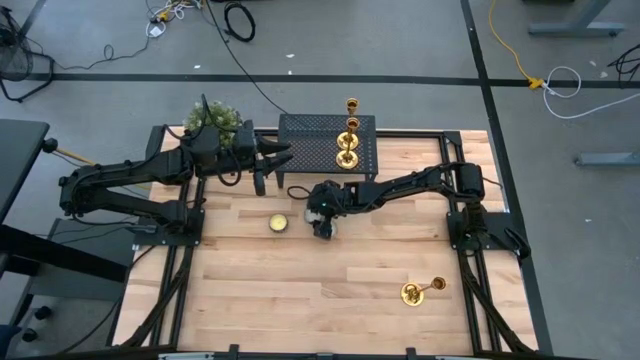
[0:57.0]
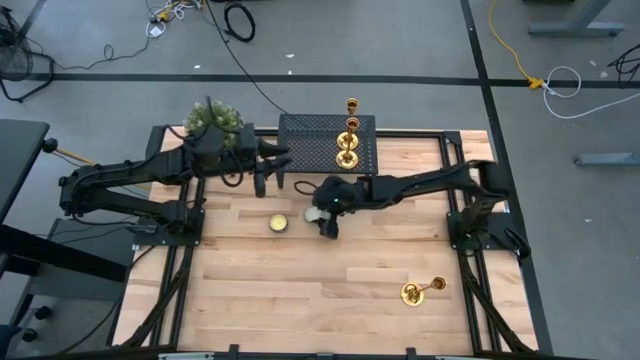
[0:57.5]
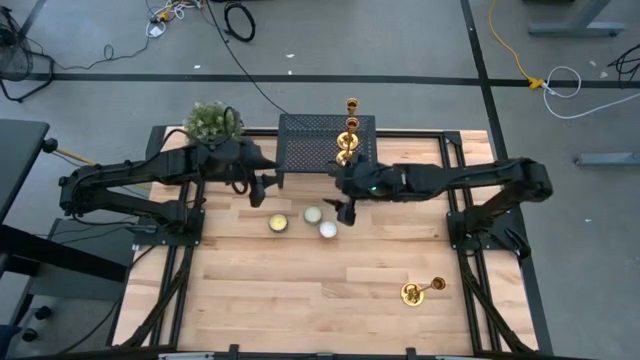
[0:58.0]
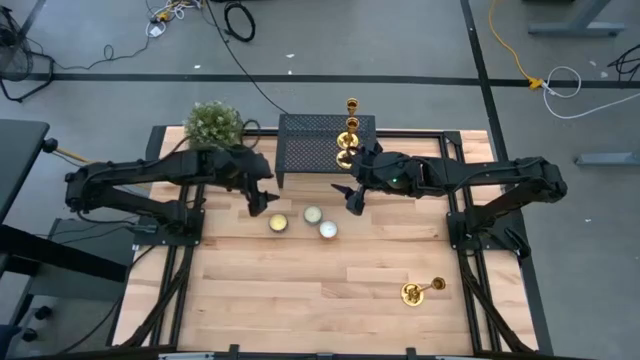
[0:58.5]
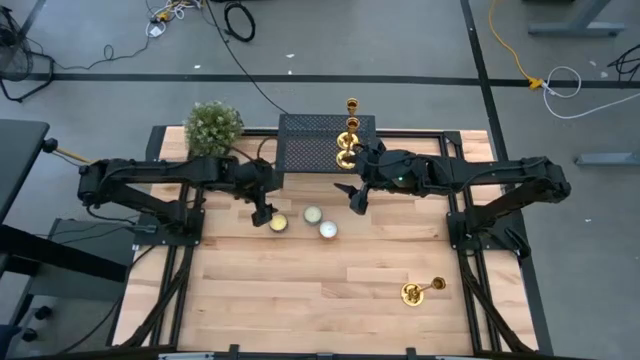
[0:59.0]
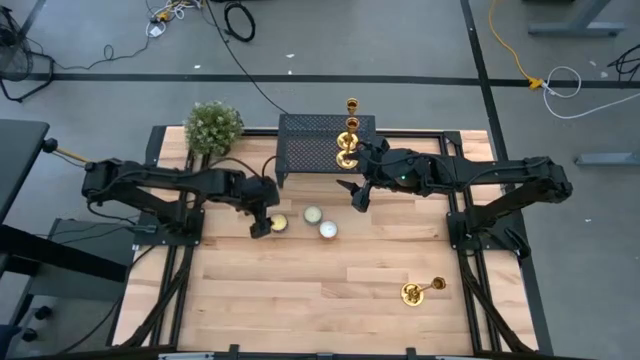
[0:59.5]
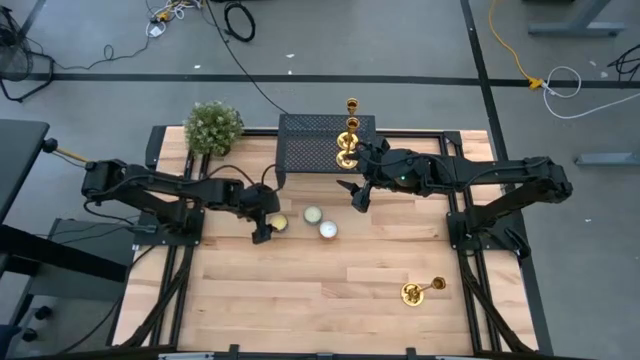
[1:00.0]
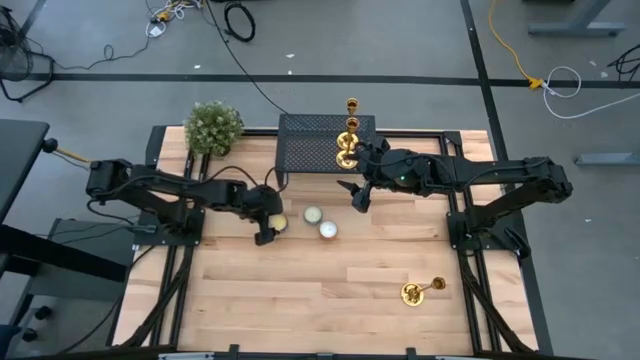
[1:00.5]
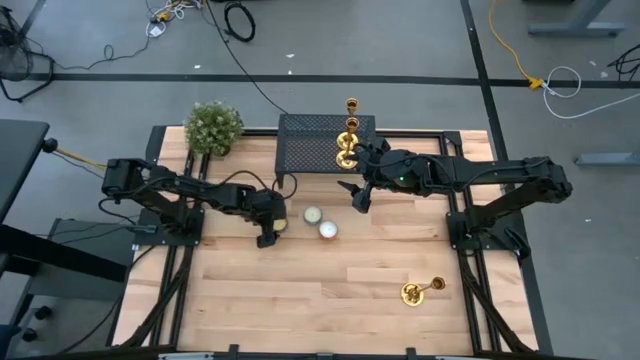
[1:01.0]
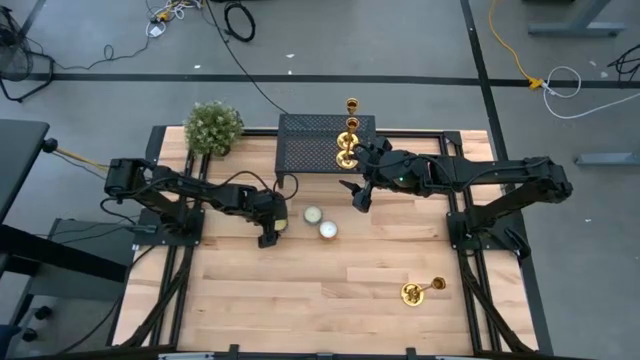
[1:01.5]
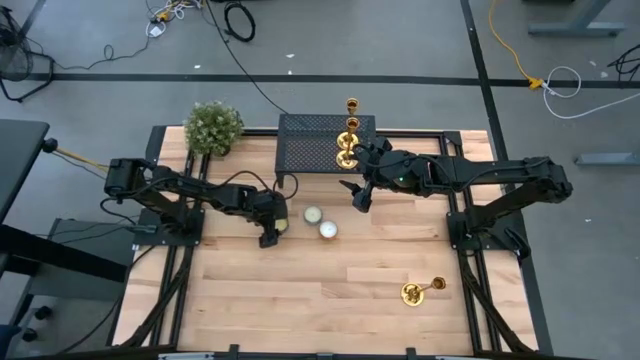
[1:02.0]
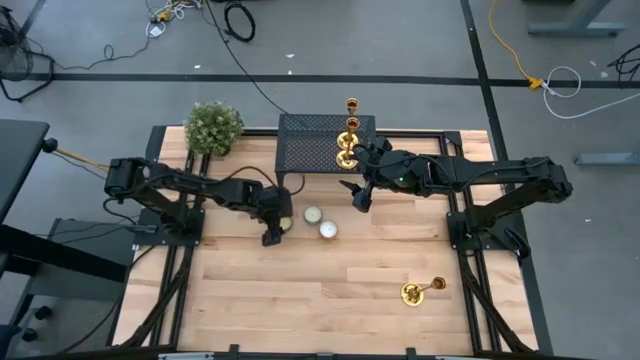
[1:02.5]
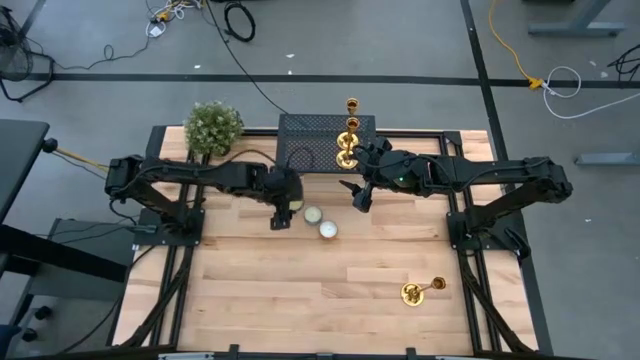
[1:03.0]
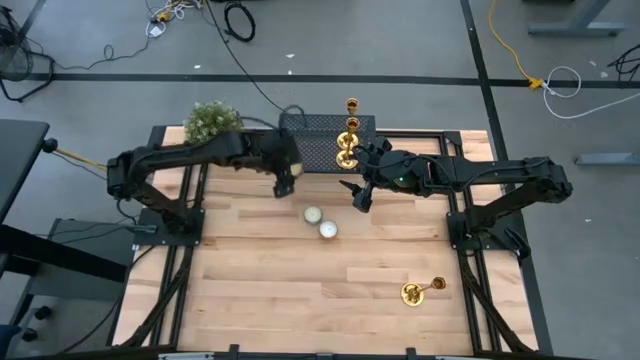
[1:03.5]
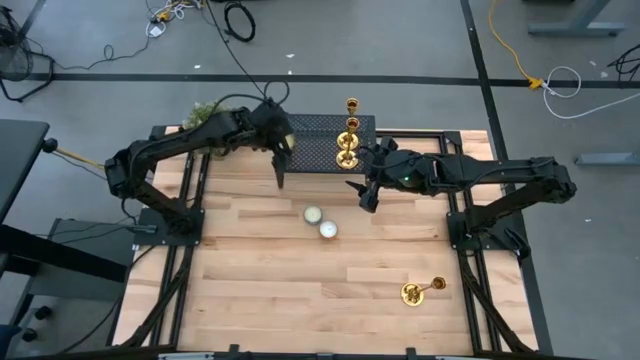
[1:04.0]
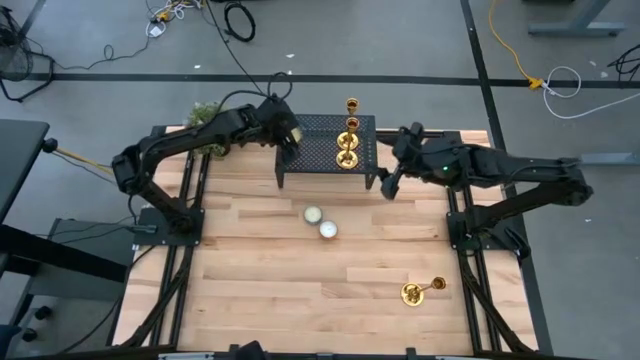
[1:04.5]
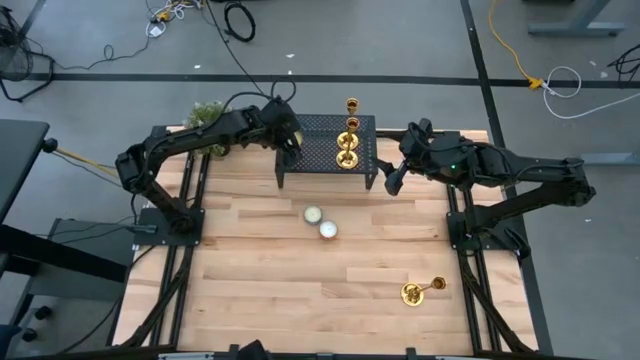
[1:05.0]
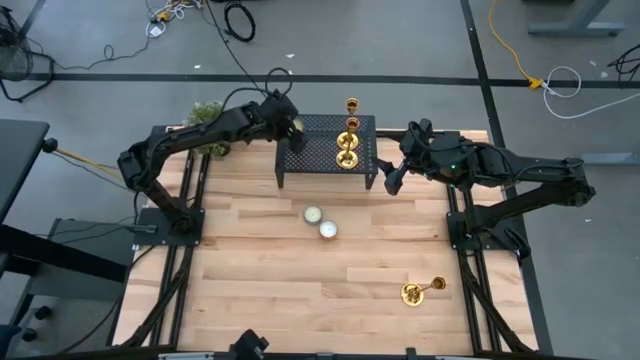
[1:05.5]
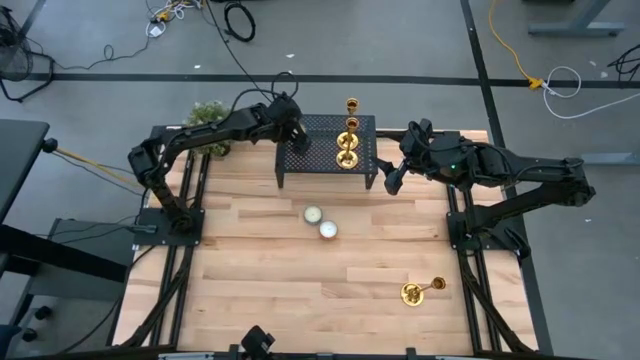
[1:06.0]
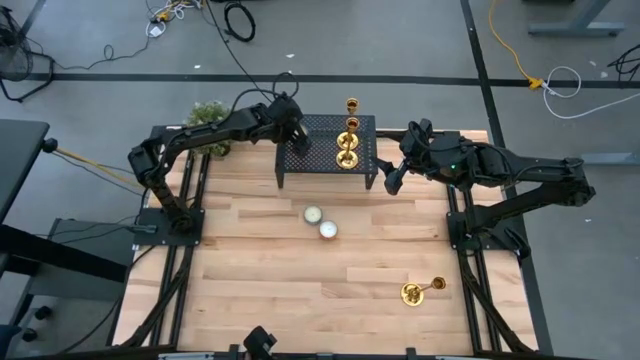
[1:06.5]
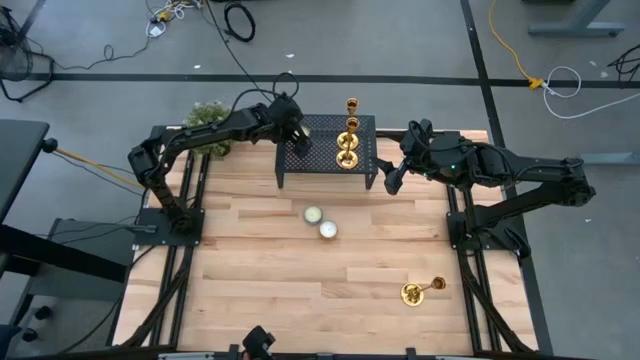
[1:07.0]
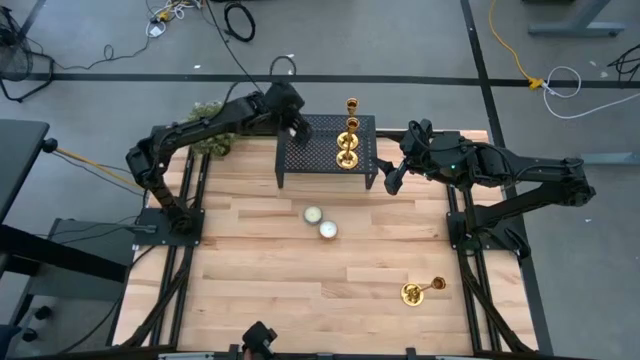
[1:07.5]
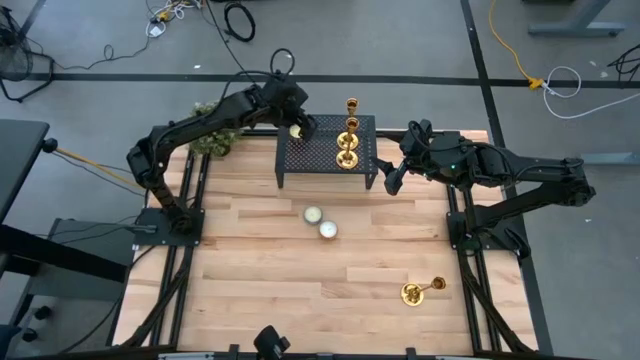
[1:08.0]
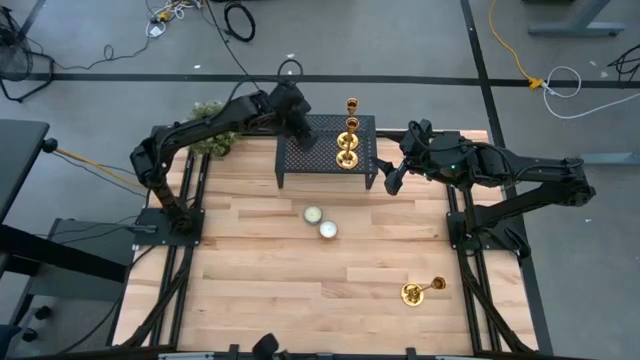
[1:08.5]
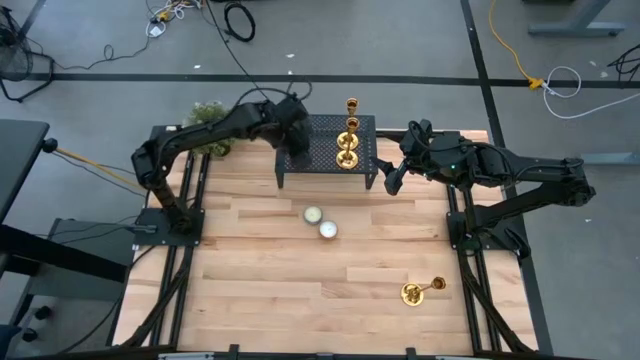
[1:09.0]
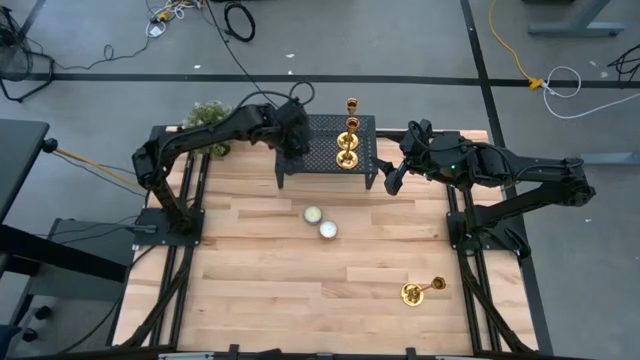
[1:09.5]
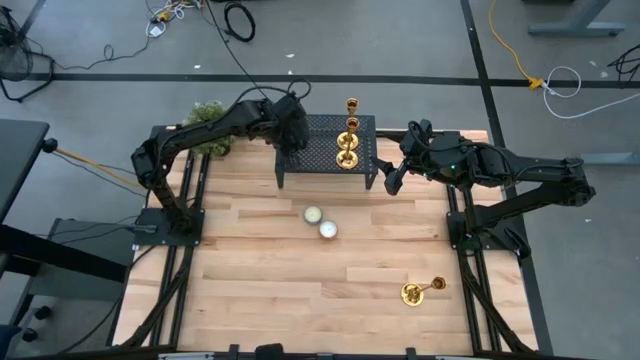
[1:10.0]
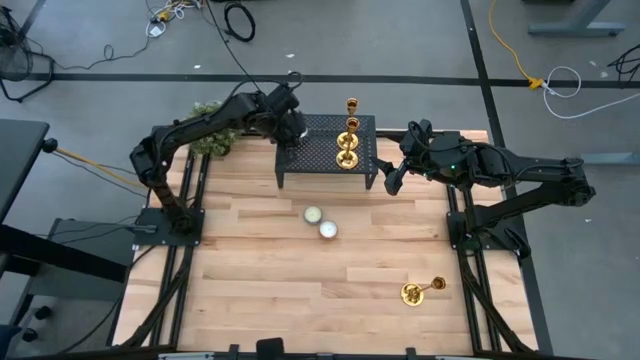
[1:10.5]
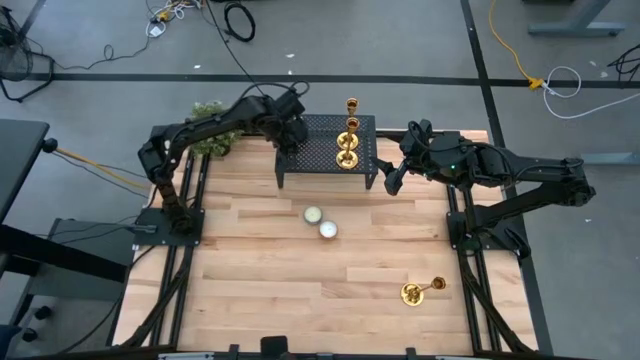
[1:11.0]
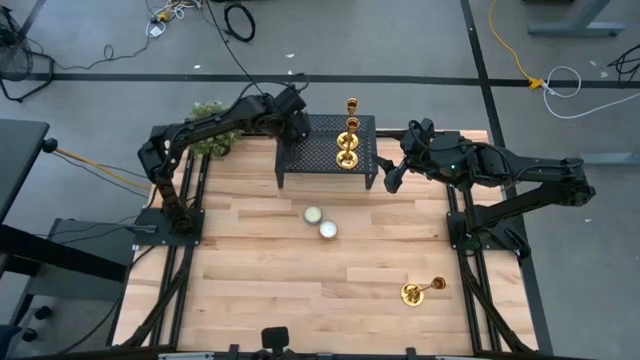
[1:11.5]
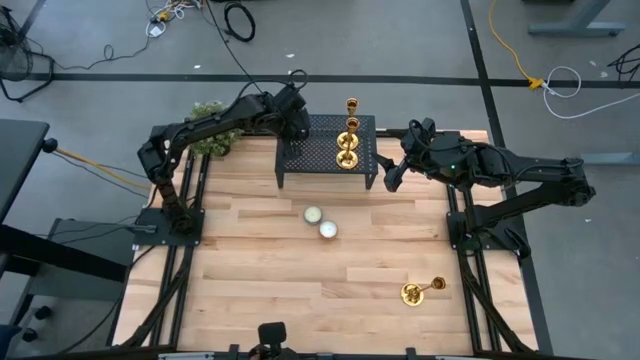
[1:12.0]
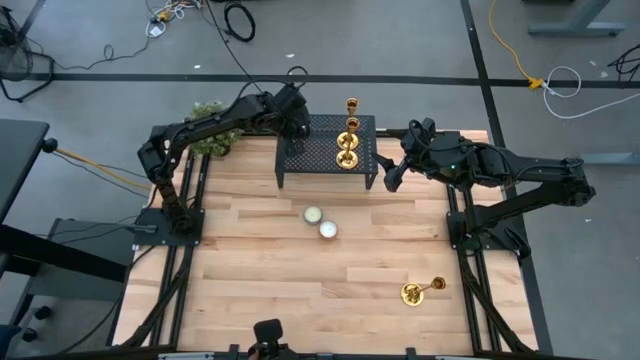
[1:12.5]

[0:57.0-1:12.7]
Task: Pick & Place candle stick holders
Put the patterned red scented candle on the shelf

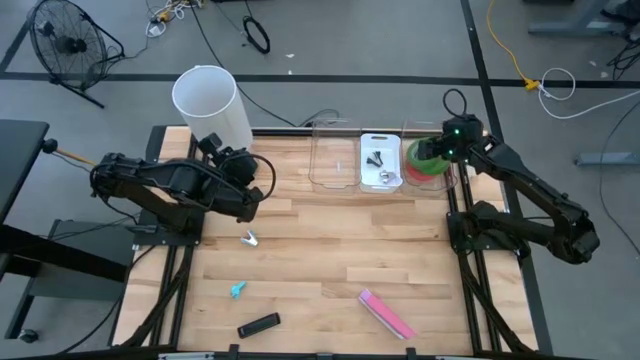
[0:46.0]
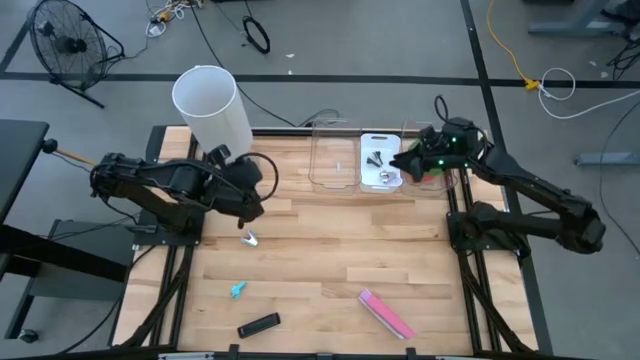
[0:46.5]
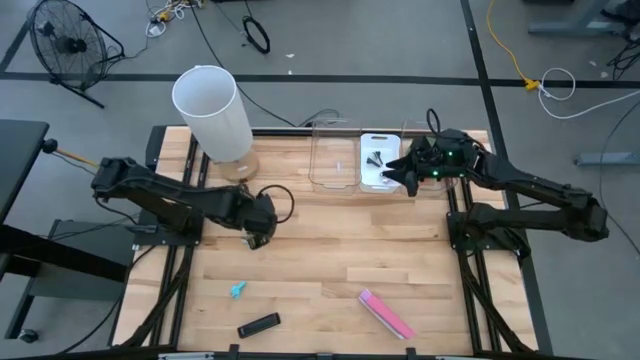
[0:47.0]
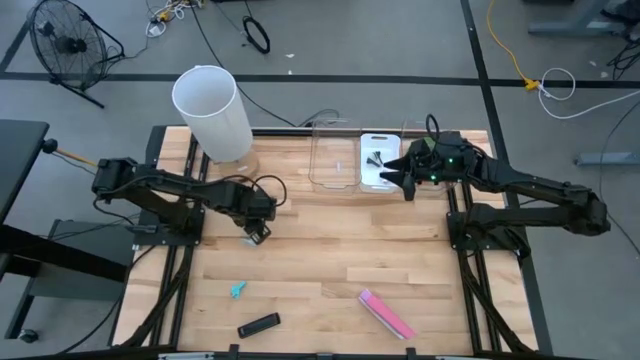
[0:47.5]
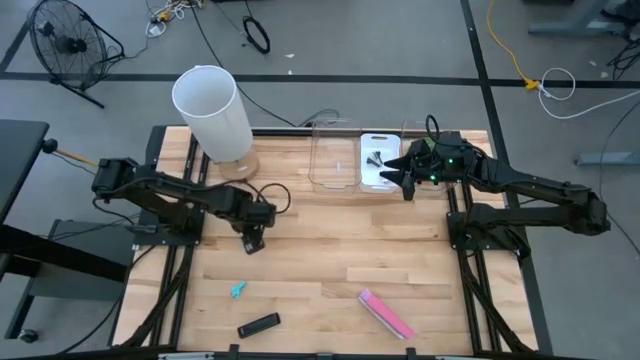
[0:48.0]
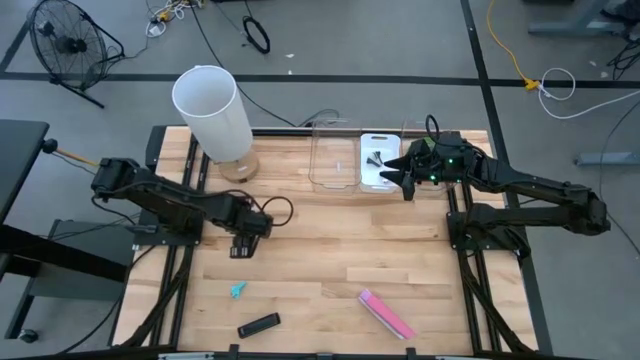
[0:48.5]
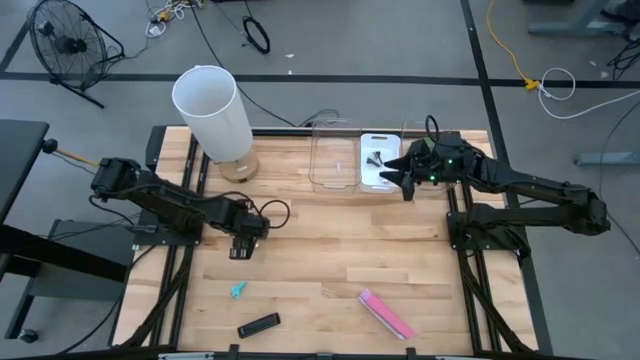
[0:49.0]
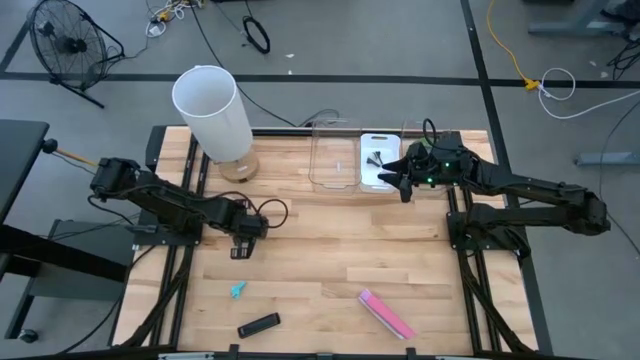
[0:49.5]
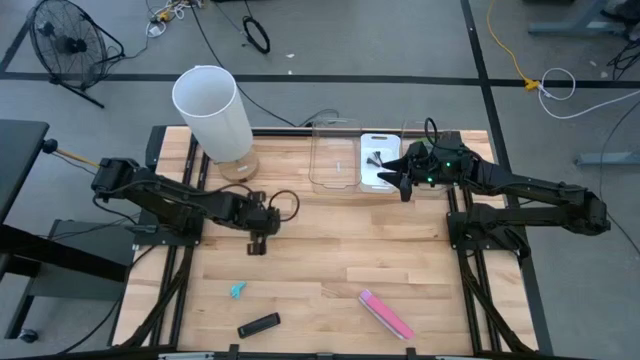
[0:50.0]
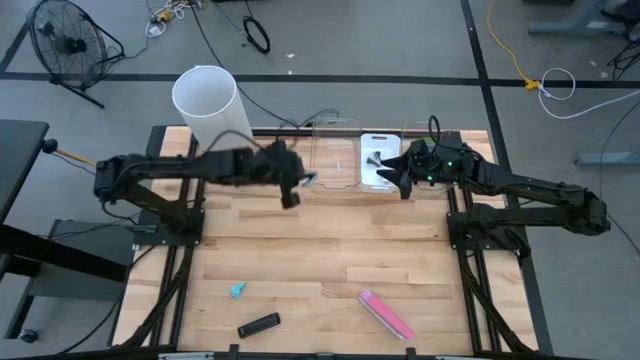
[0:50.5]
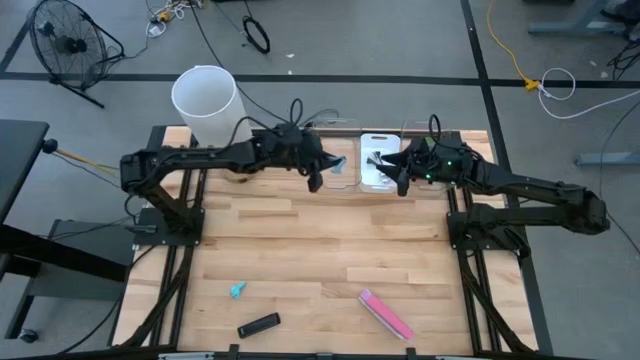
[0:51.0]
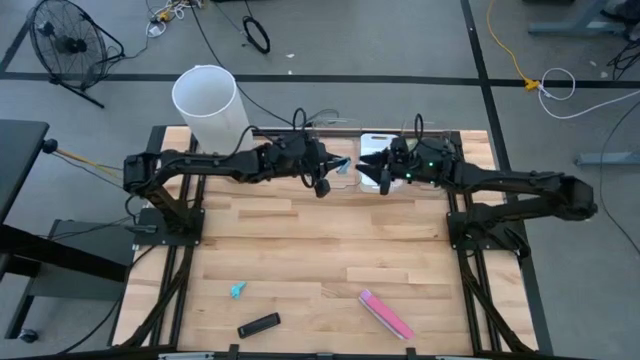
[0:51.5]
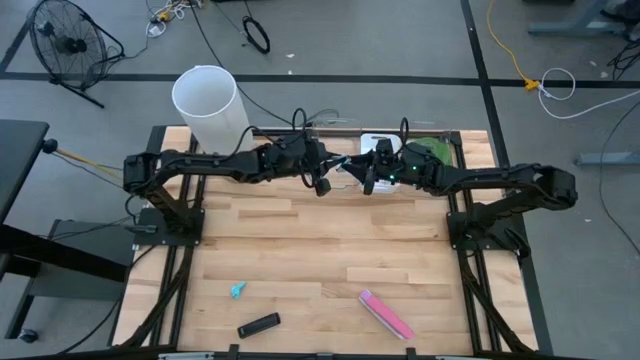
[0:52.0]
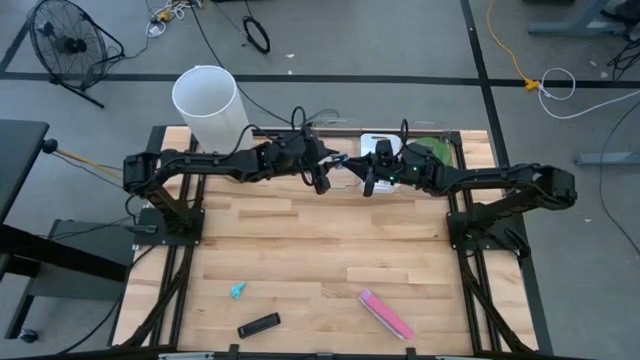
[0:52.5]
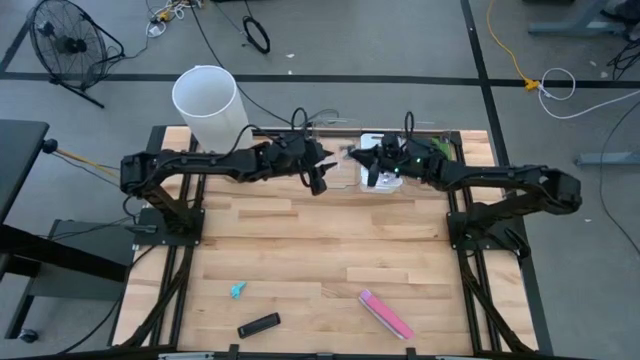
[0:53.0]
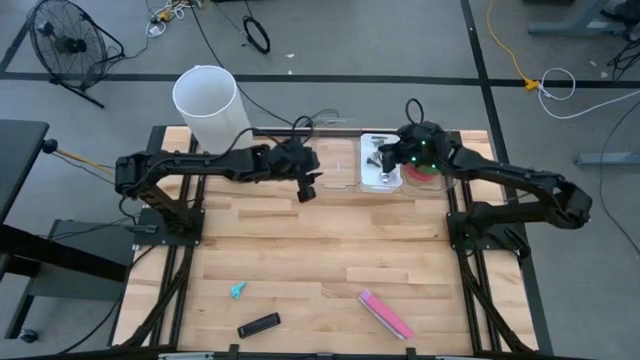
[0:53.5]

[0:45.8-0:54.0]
Task: Pick and place Stapler, Stapler remover, tape
Put the blue staple remover into the white bin
